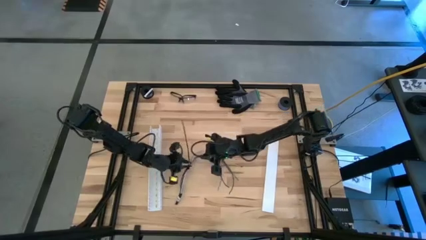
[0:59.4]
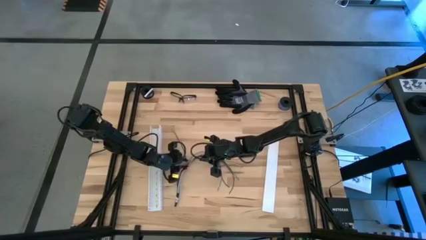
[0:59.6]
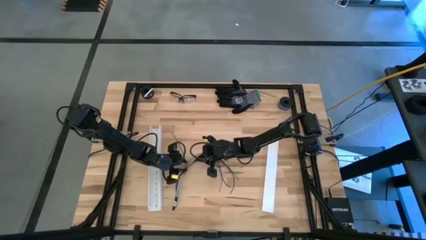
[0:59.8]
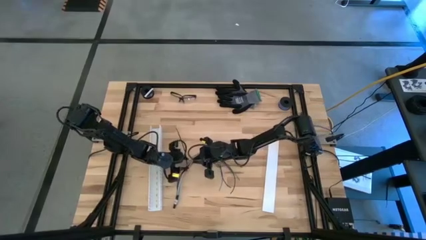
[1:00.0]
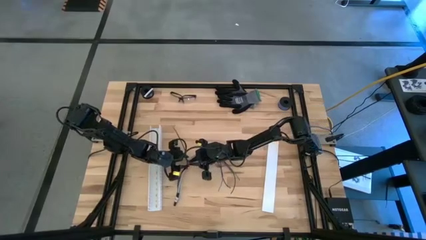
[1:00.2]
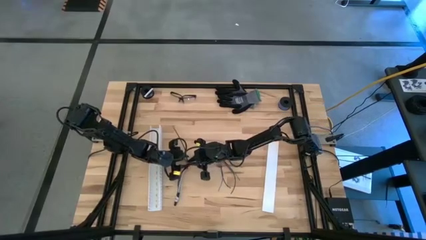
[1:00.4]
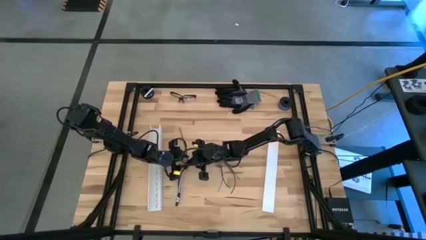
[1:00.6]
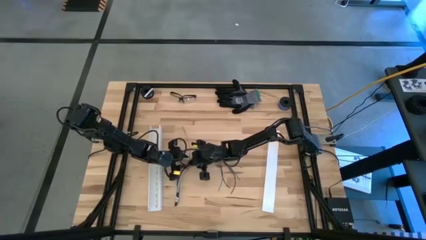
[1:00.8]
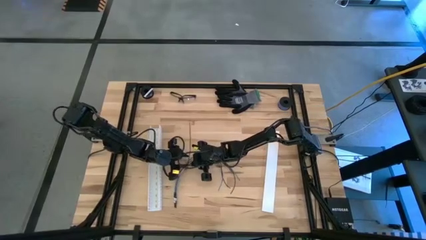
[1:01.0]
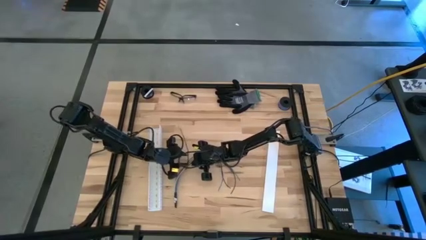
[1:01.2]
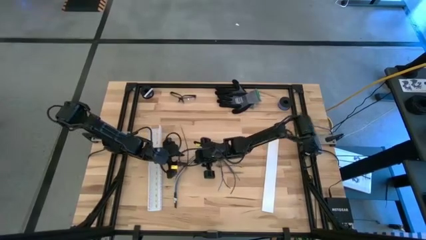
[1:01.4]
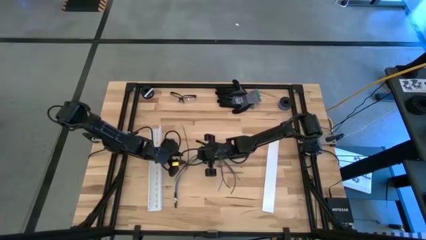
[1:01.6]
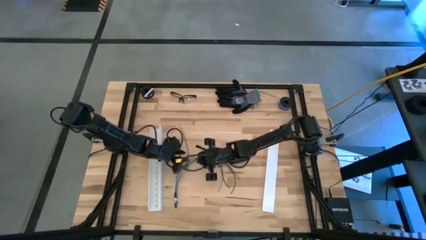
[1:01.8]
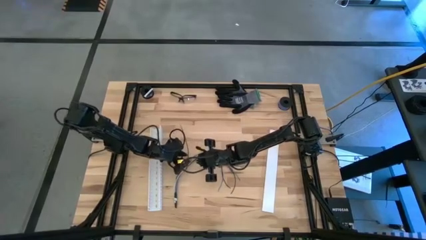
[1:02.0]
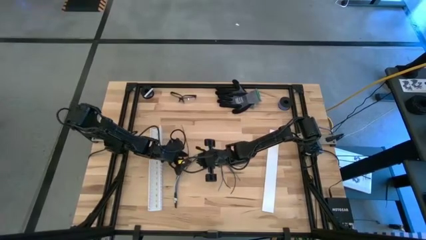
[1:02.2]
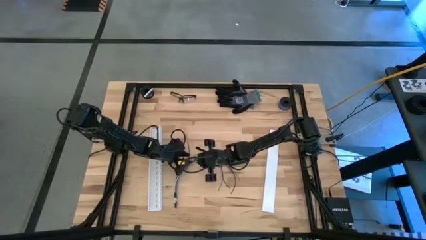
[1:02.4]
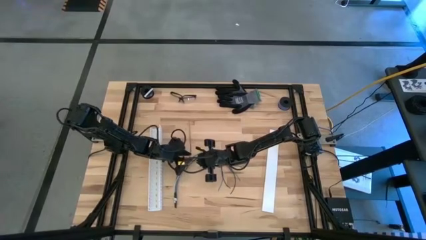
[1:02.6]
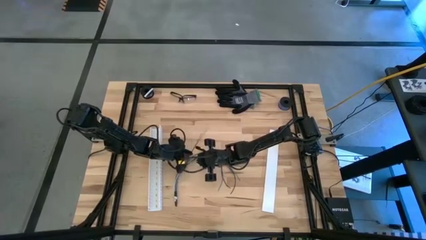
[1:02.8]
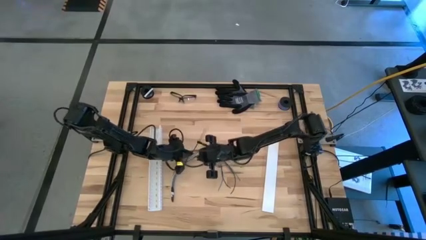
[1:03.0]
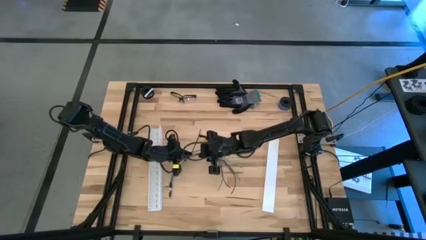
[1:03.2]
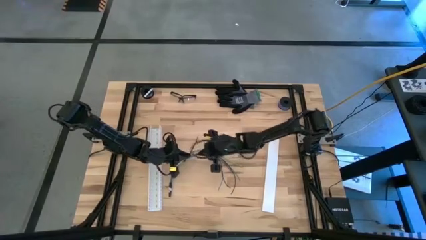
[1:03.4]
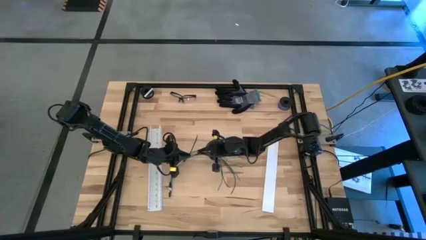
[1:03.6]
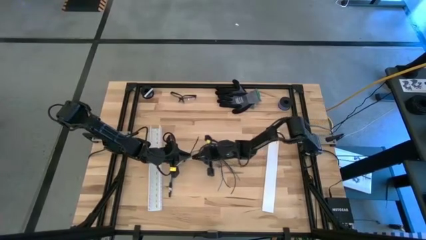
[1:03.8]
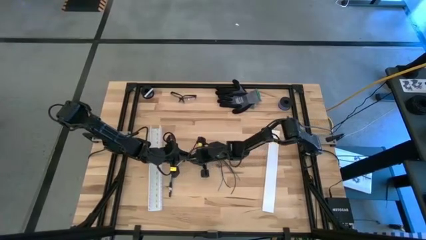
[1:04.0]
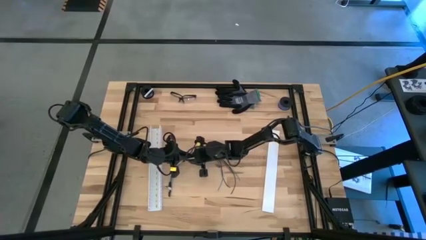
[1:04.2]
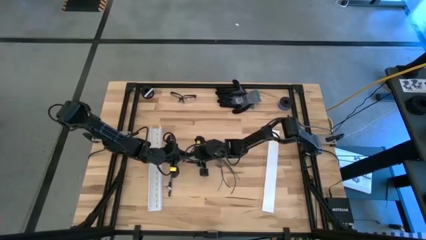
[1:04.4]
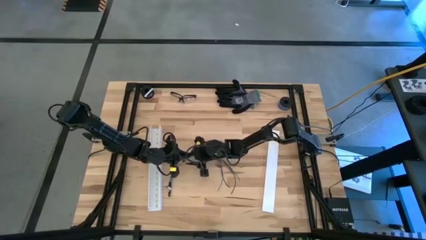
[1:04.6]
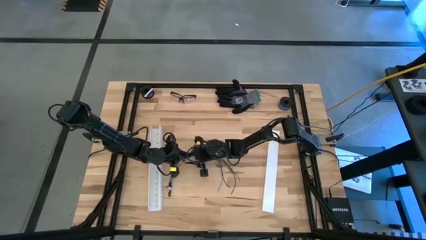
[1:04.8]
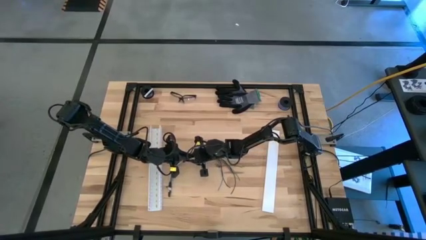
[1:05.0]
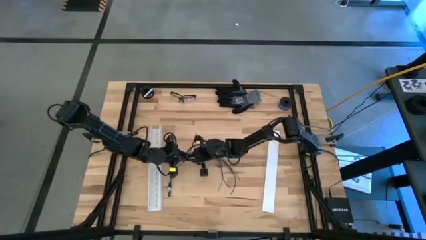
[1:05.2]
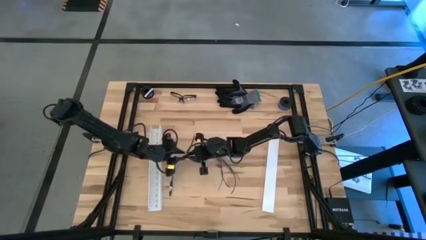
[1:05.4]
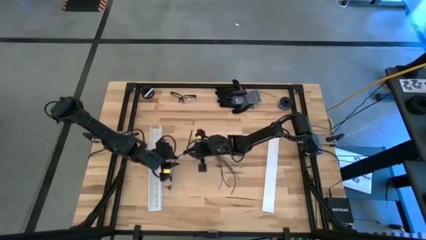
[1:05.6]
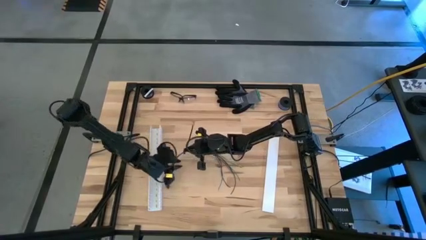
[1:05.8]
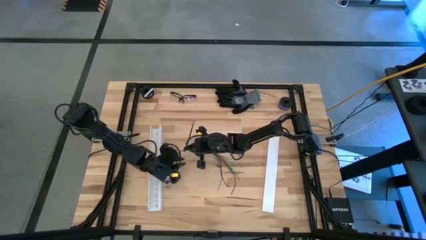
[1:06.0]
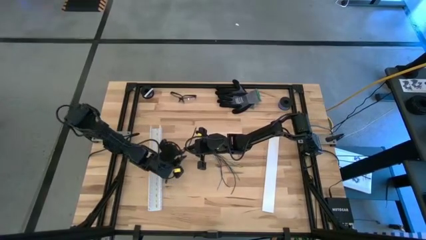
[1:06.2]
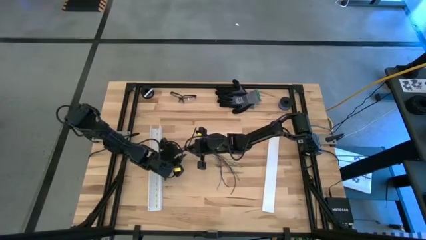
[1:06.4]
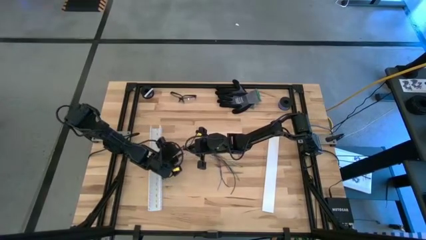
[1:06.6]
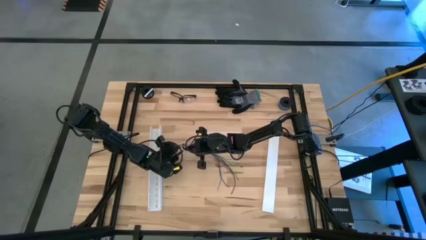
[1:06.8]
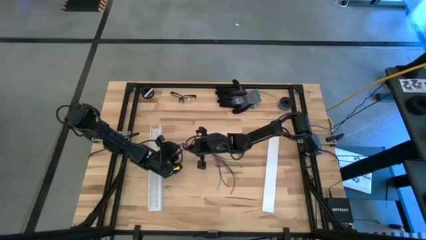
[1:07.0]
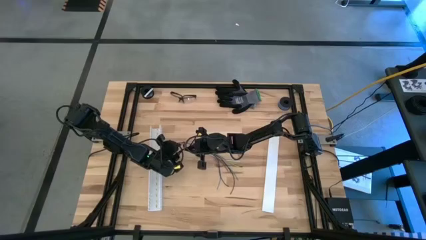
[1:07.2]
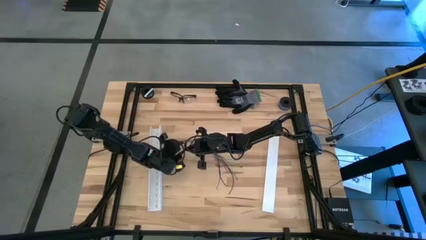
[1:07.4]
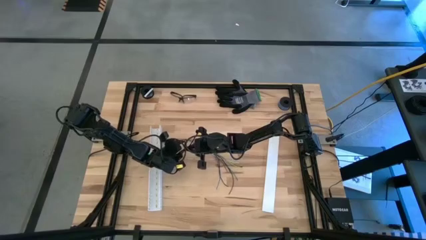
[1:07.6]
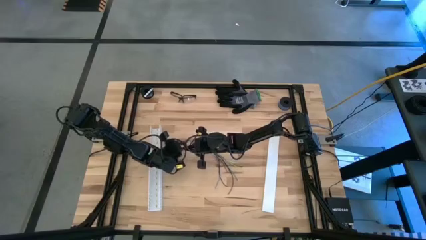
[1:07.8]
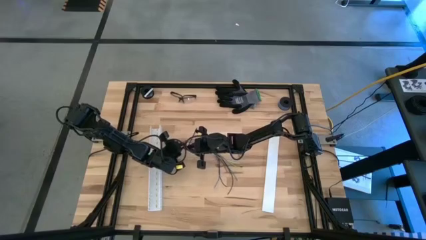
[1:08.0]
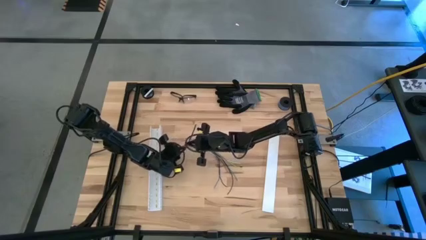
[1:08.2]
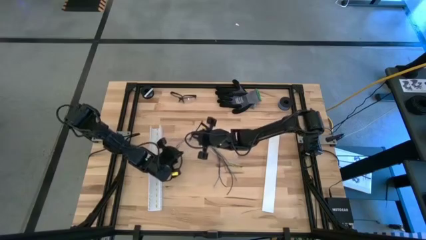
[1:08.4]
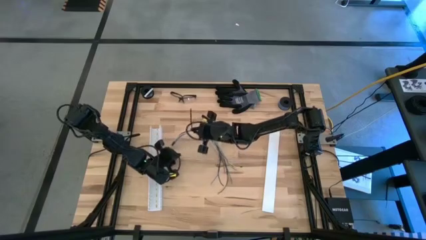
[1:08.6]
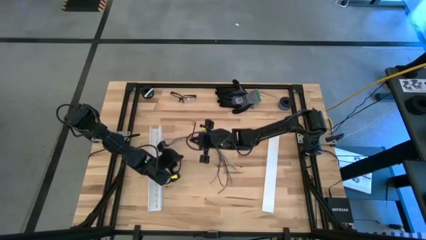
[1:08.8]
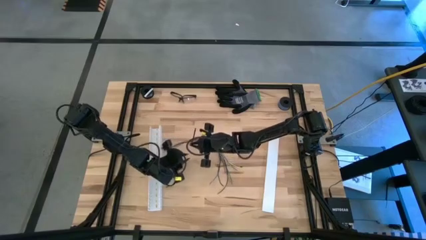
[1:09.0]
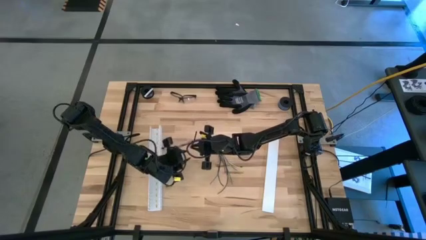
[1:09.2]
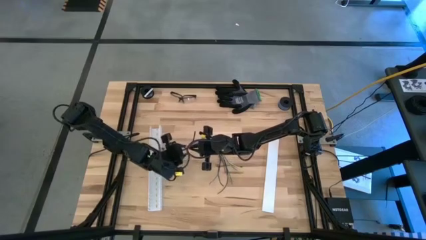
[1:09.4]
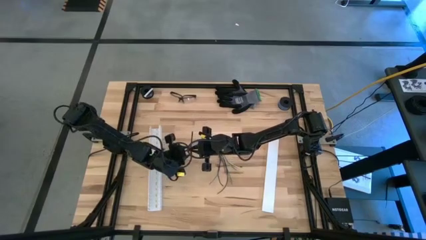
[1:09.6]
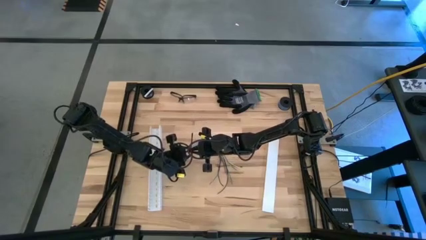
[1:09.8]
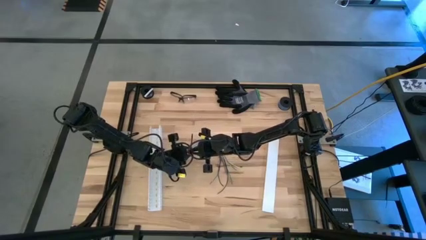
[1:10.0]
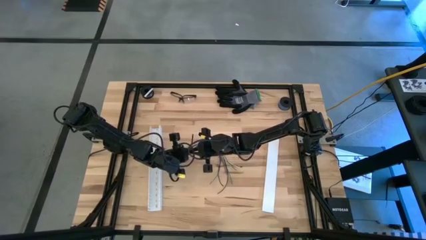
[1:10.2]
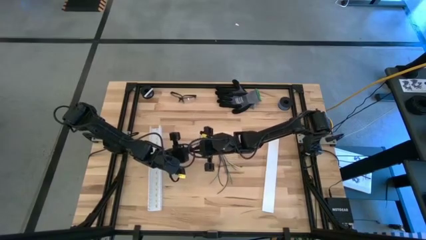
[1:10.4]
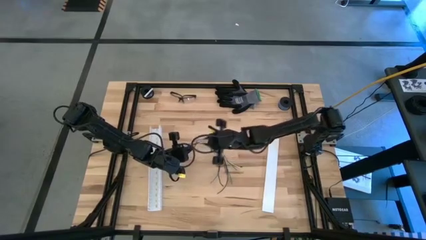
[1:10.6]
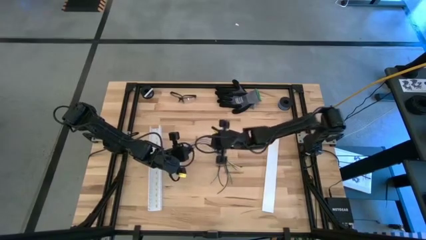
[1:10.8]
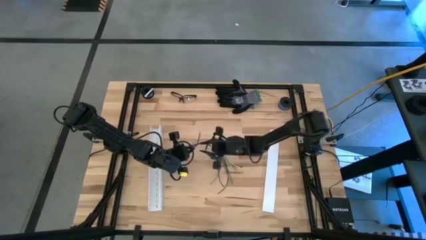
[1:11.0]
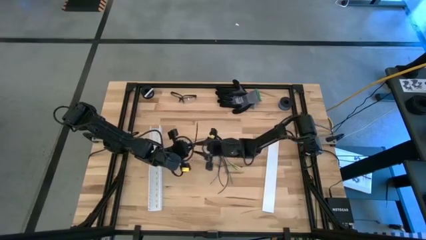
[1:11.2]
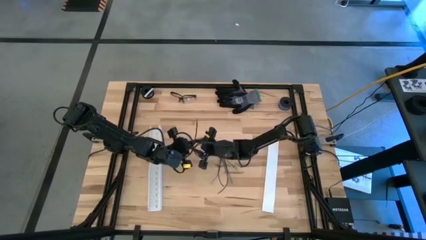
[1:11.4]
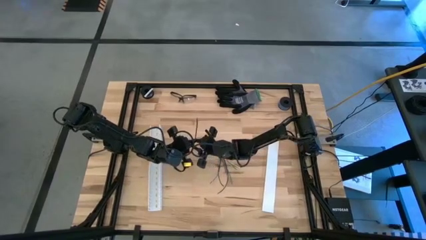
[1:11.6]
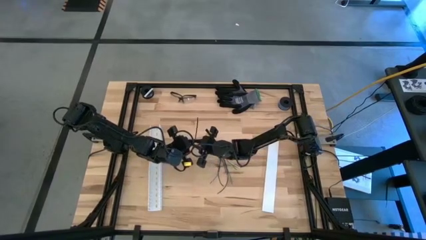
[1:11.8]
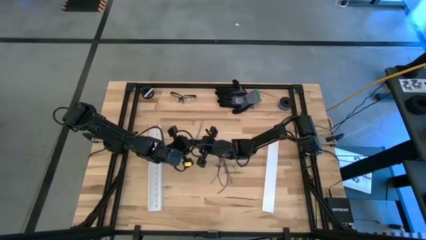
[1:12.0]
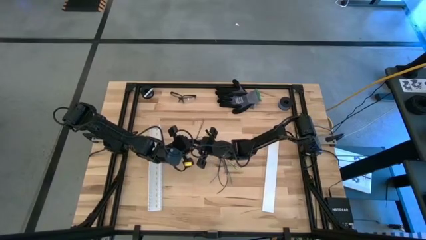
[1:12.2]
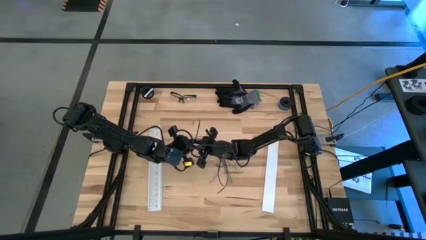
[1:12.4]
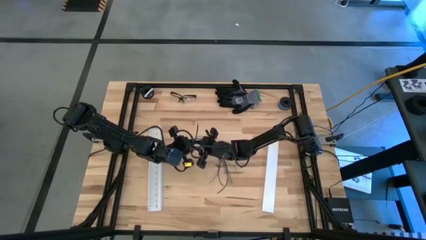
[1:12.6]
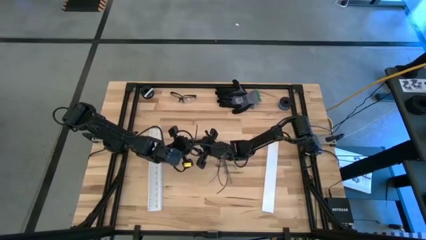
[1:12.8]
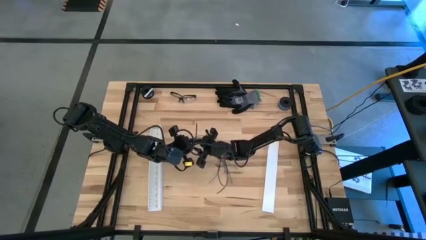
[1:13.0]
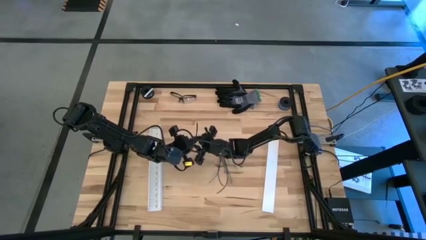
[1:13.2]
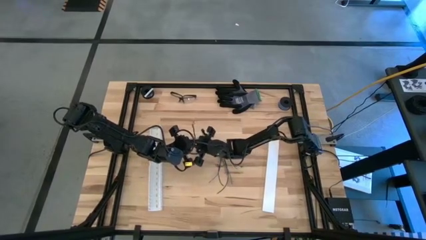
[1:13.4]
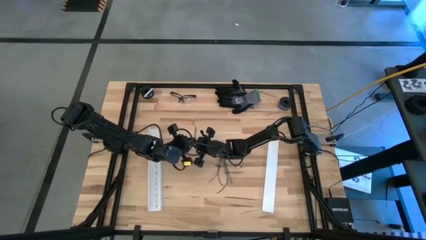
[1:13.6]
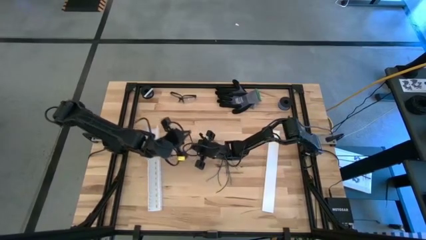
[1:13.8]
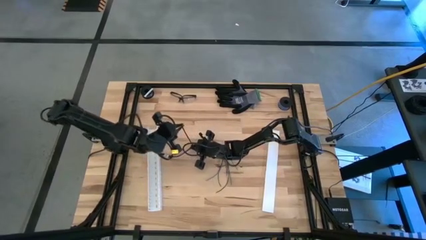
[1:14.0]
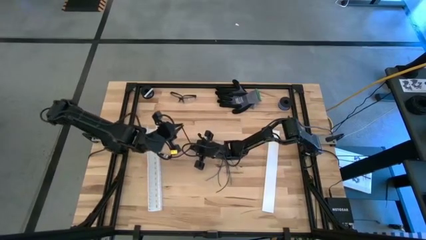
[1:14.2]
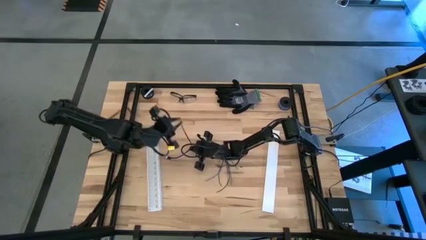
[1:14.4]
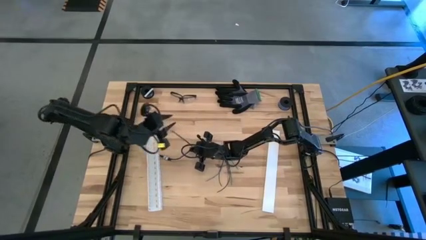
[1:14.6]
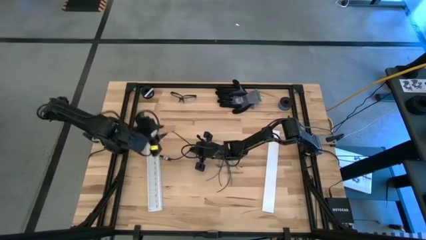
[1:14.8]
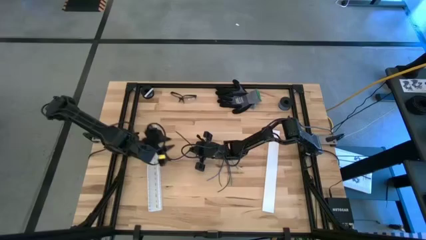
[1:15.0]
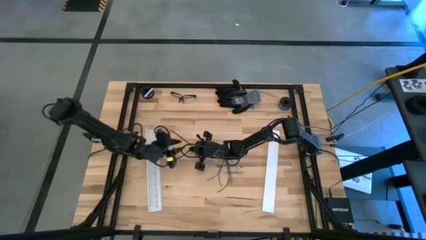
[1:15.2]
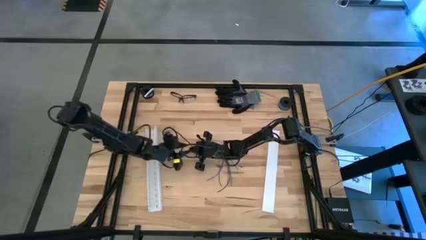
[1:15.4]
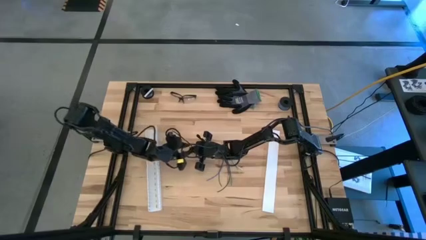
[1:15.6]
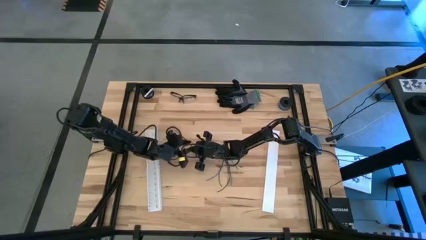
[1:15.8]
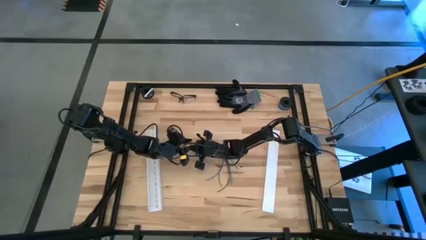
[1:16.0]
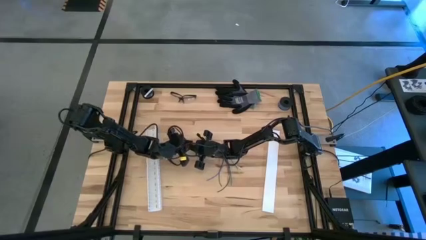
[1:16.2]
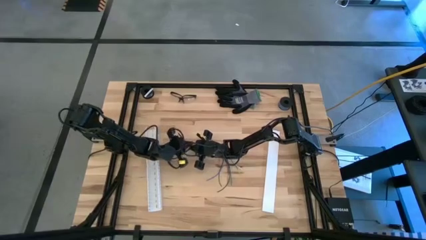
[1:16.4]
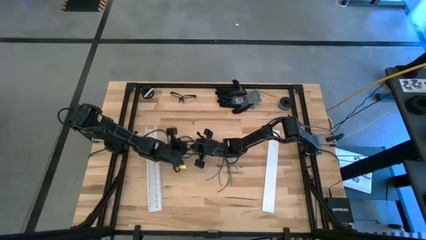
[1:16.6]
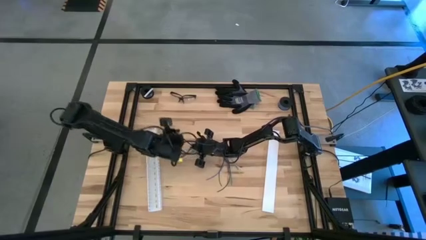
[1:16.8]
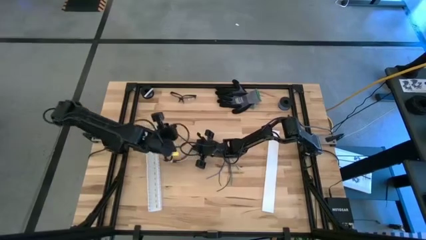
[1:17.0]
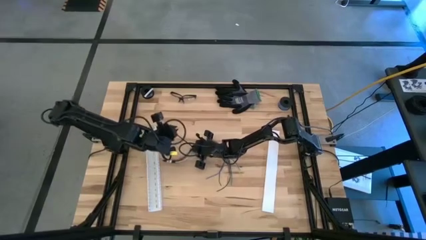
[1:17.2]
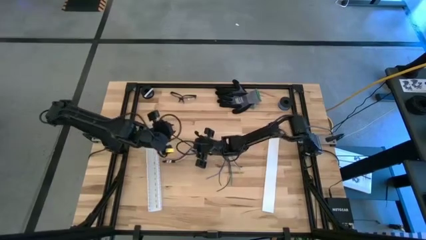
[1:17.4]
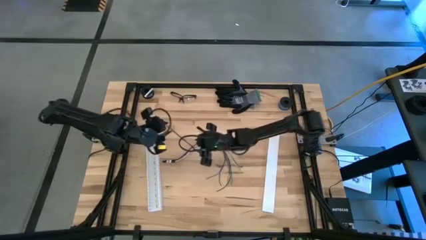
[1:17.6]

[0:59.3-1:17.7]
Task: Ziptie cables
Close the zip tie
